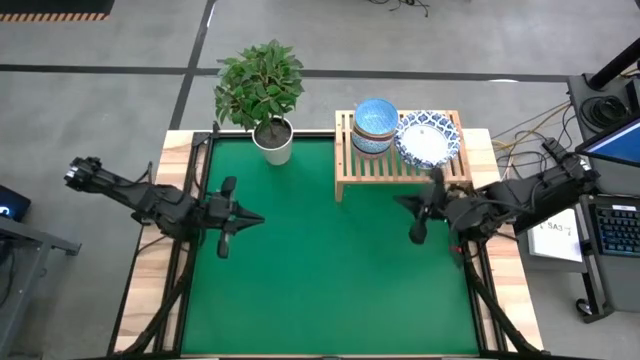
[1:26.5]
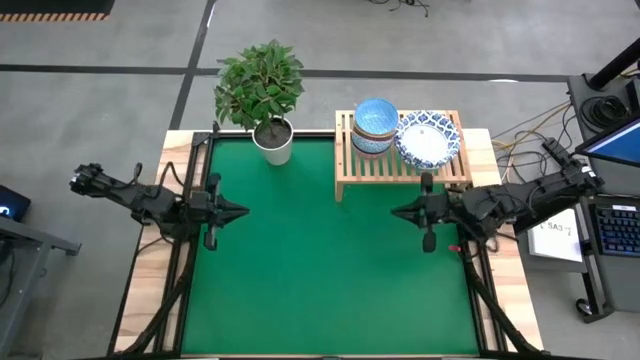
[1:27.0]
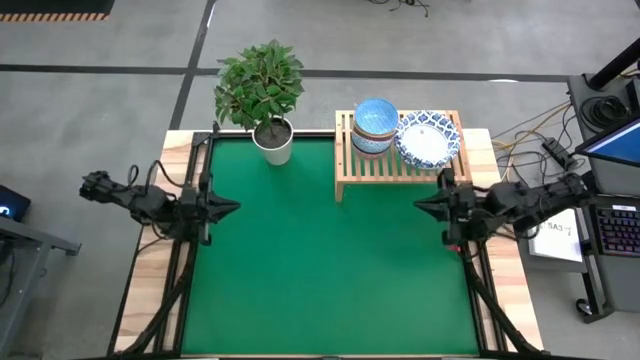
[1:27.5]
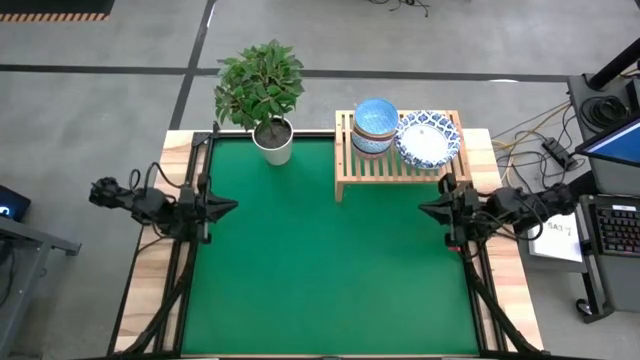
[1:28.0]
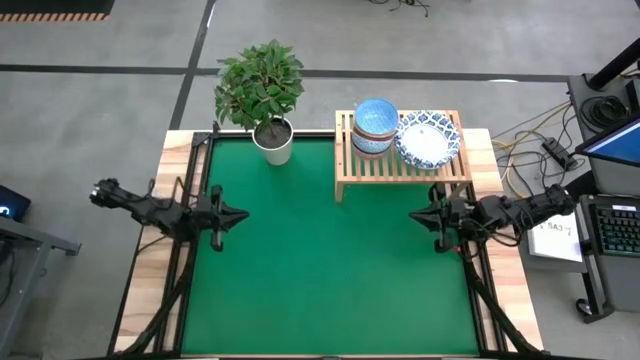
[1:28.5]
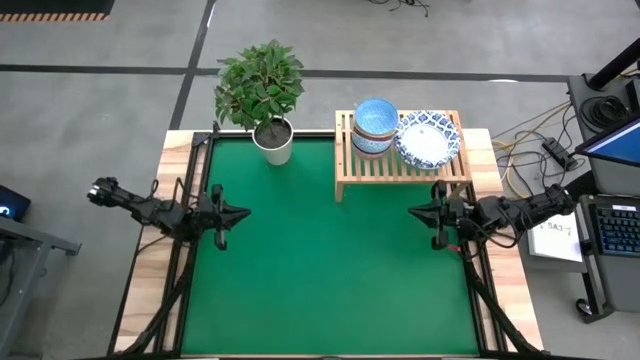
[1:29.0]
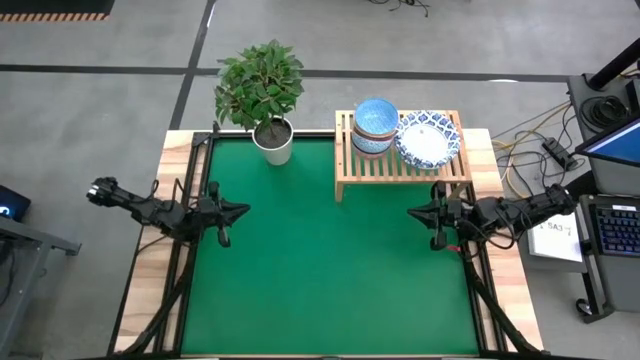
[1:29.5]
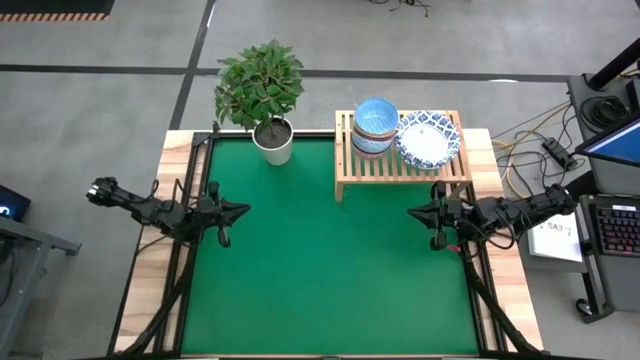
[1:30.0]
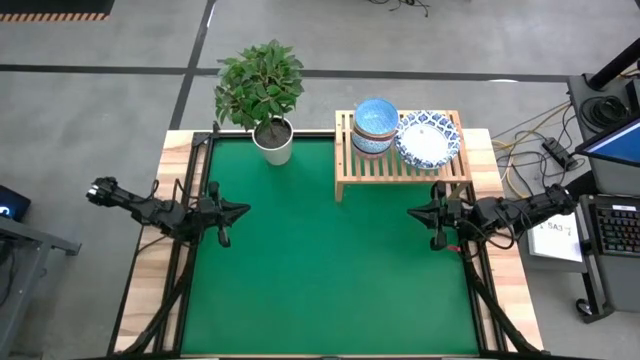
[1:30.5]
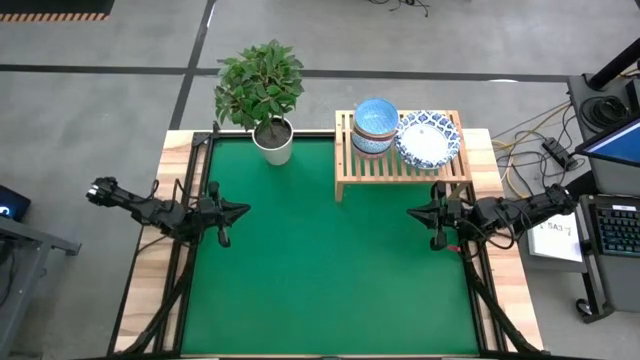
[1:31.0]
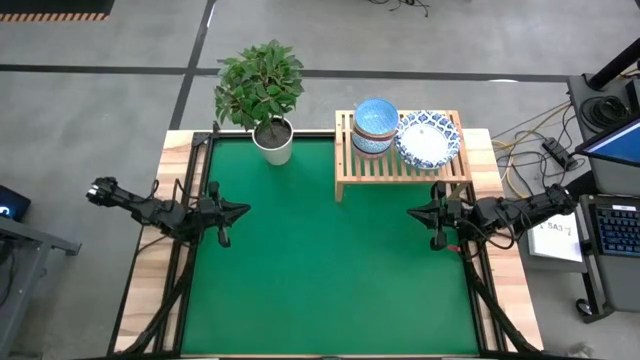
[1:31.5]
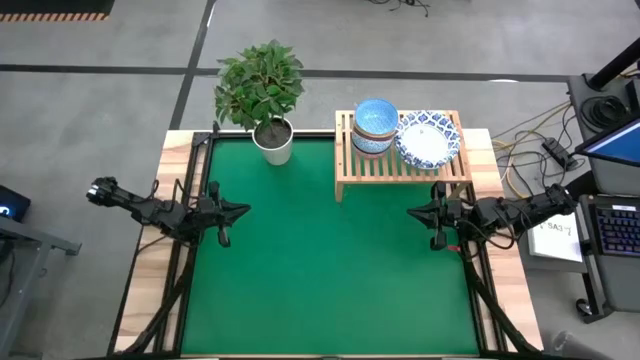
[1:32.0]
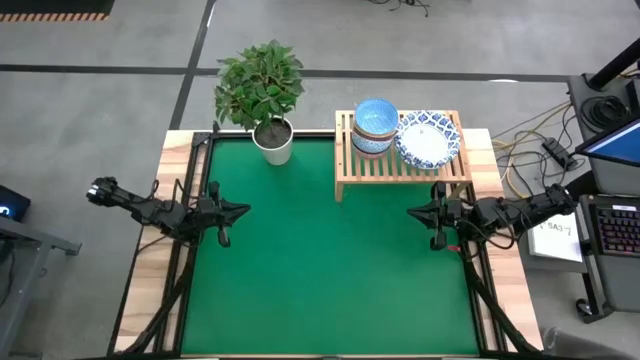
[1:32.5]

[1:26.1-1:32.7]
Task: Place and stack bowls onto a shelf
Return to Home Position

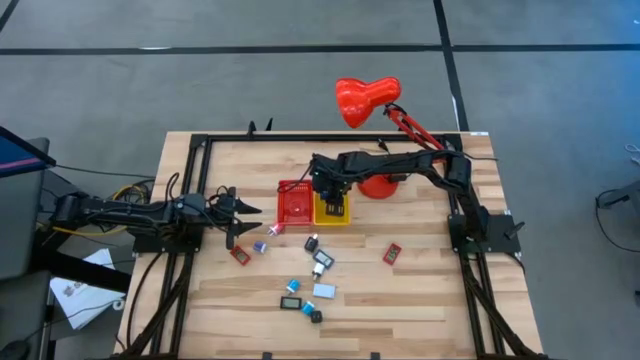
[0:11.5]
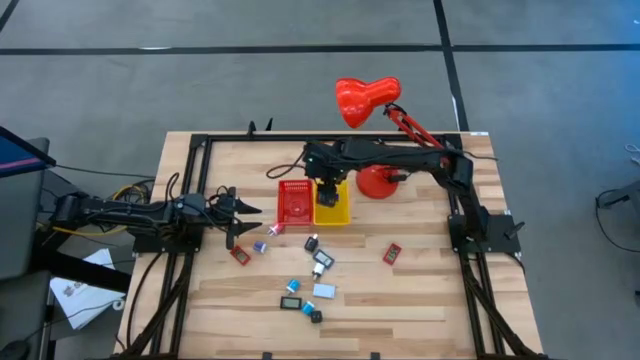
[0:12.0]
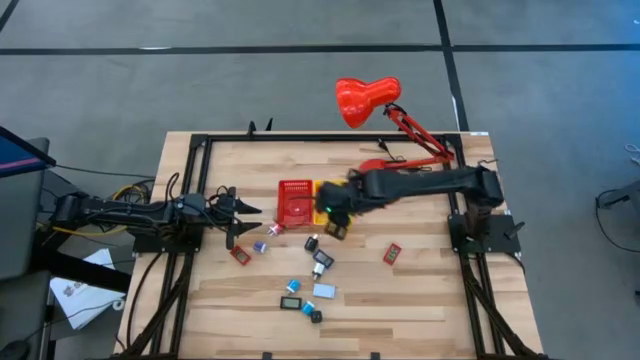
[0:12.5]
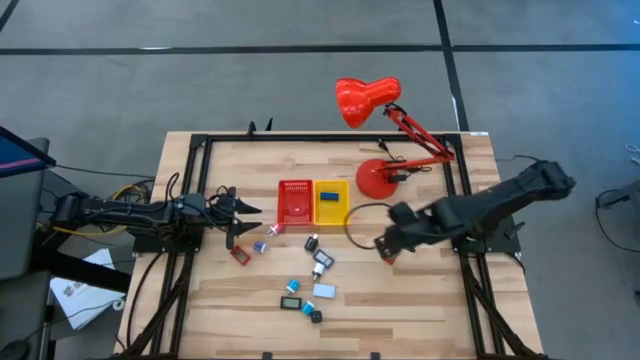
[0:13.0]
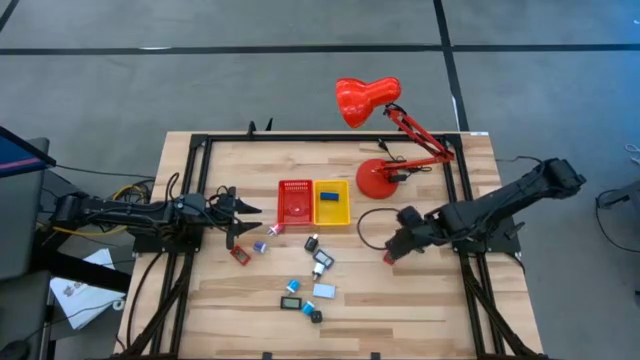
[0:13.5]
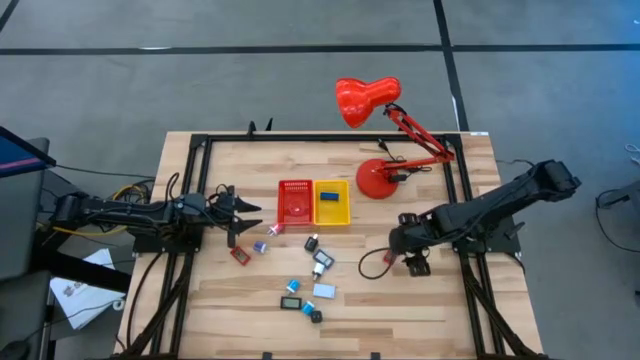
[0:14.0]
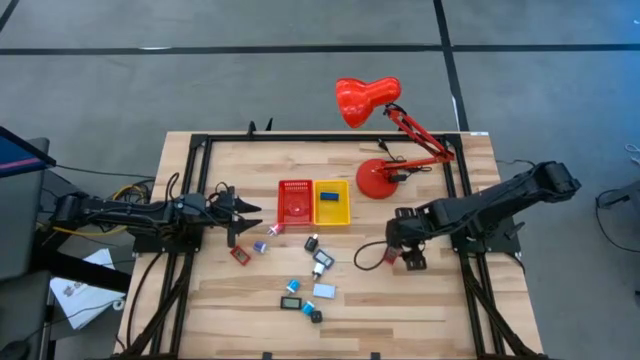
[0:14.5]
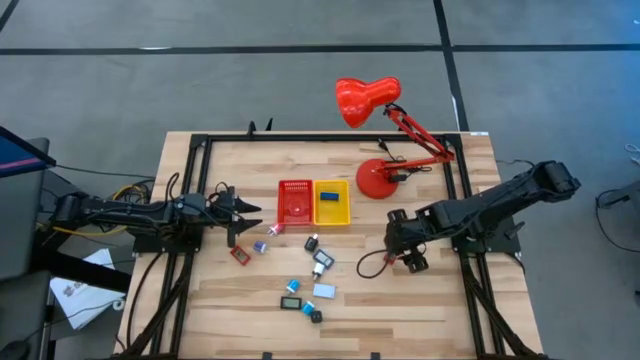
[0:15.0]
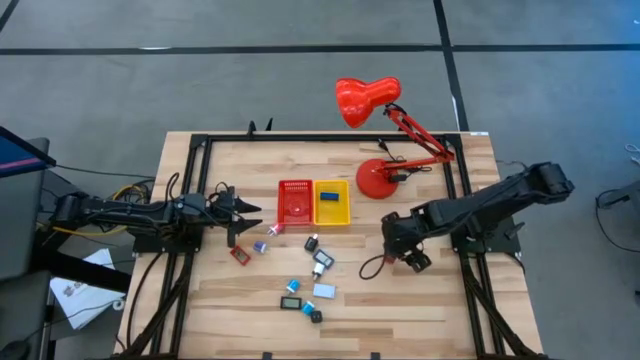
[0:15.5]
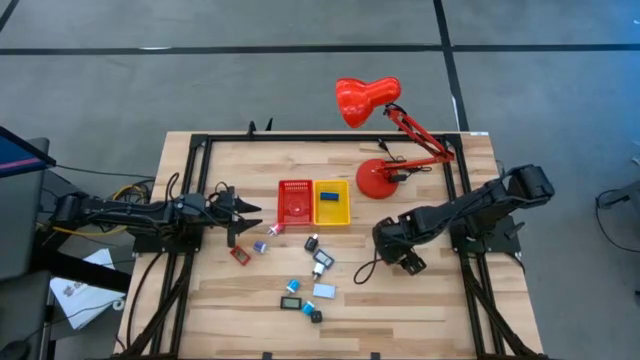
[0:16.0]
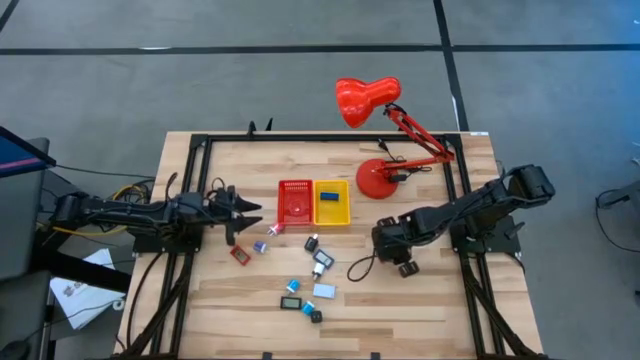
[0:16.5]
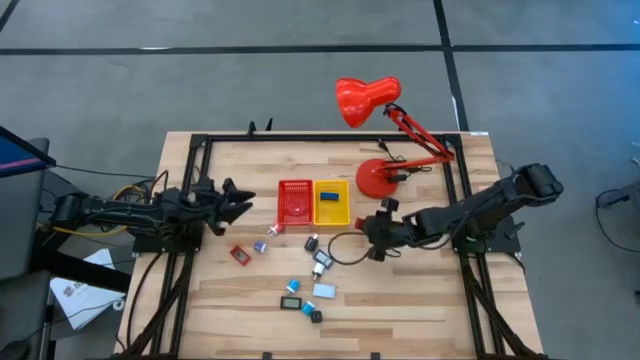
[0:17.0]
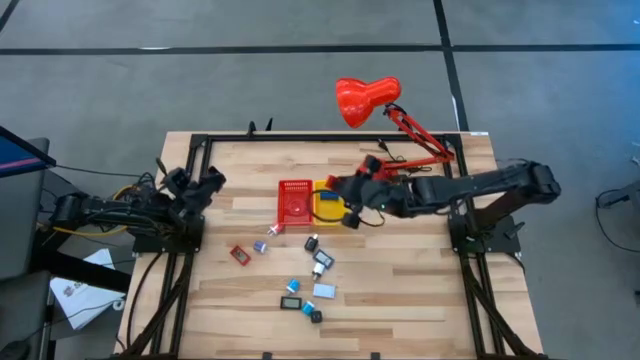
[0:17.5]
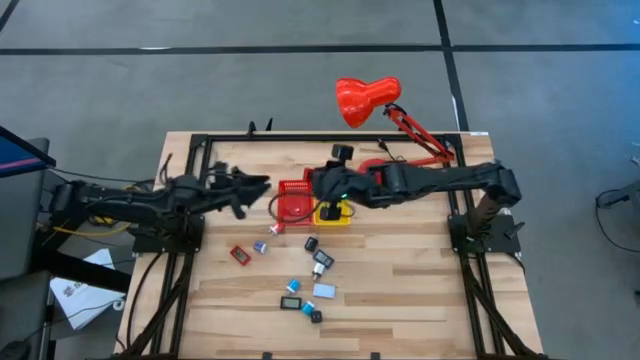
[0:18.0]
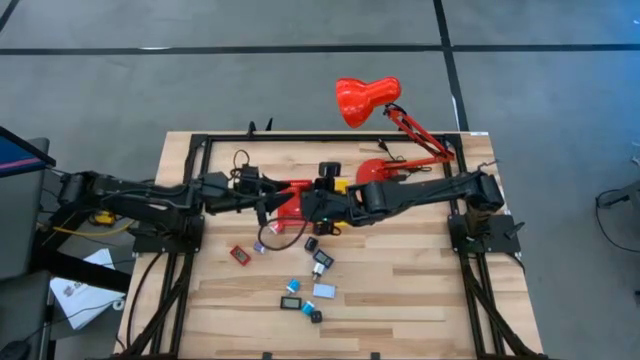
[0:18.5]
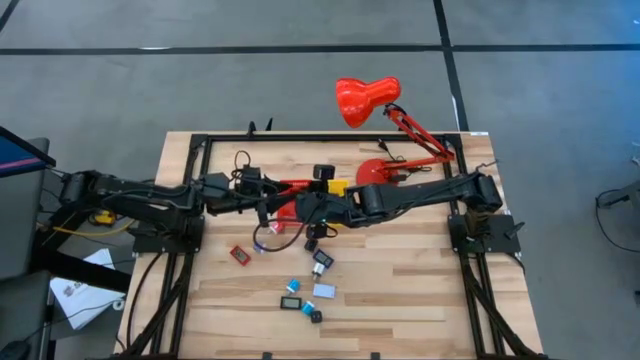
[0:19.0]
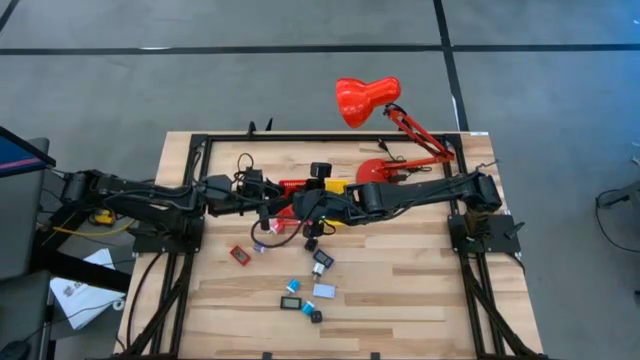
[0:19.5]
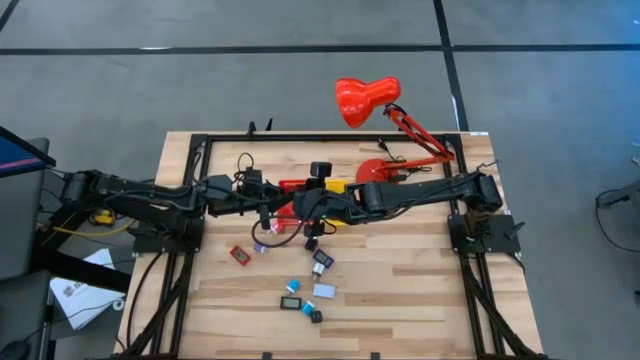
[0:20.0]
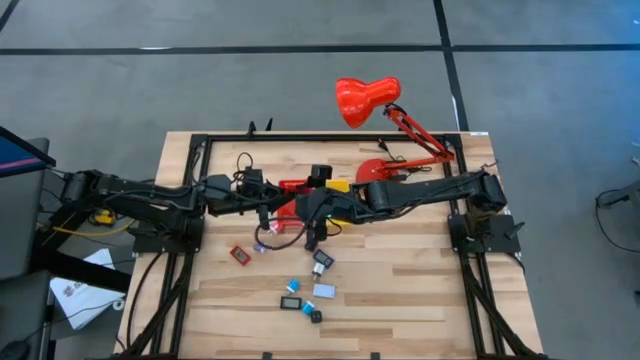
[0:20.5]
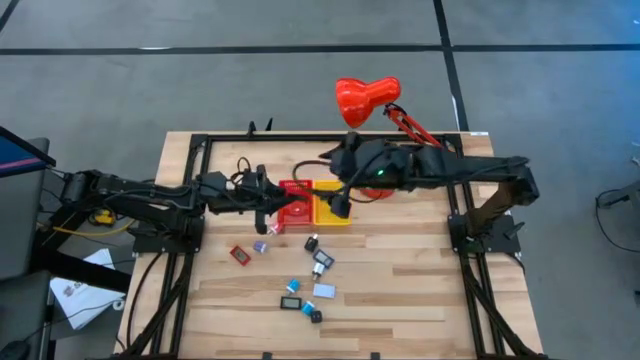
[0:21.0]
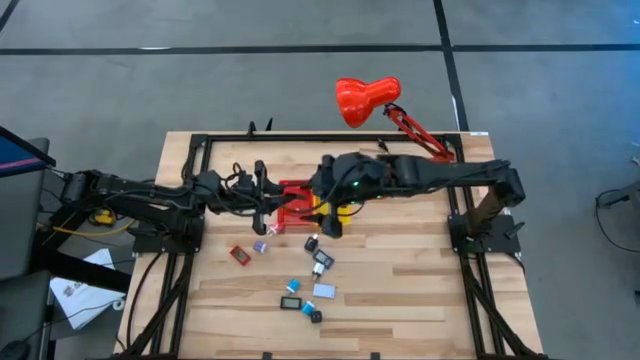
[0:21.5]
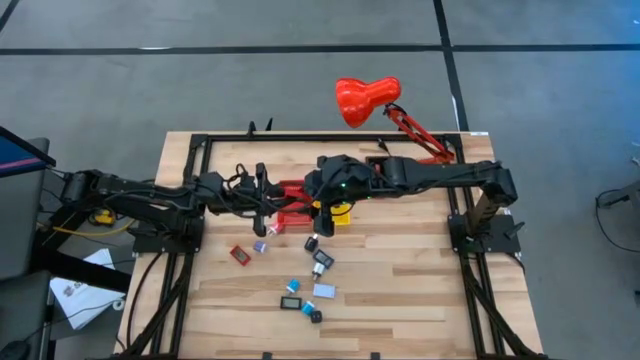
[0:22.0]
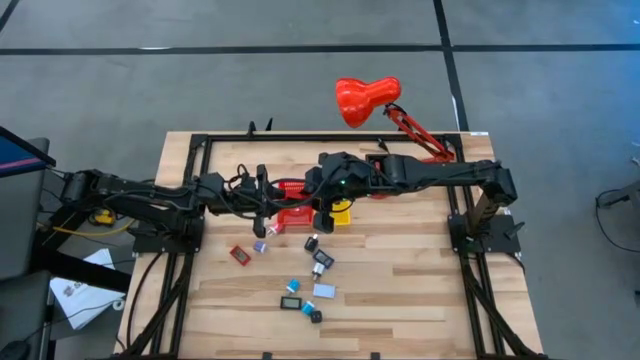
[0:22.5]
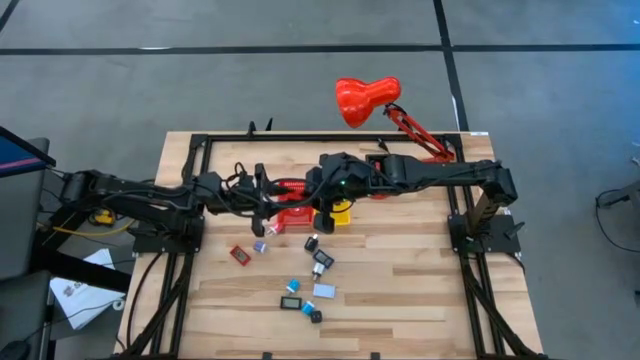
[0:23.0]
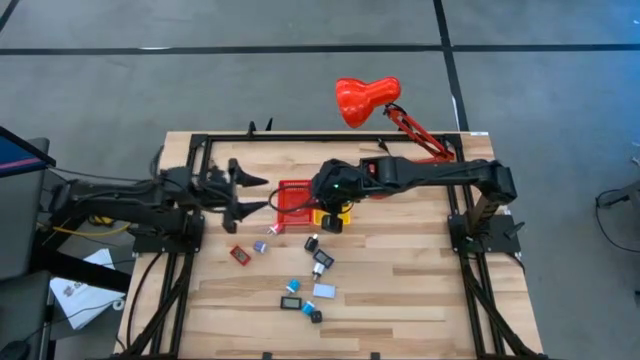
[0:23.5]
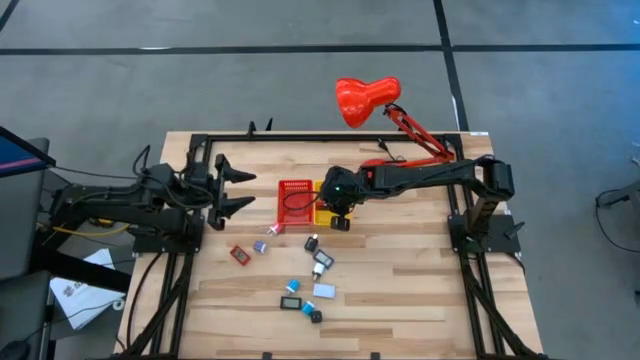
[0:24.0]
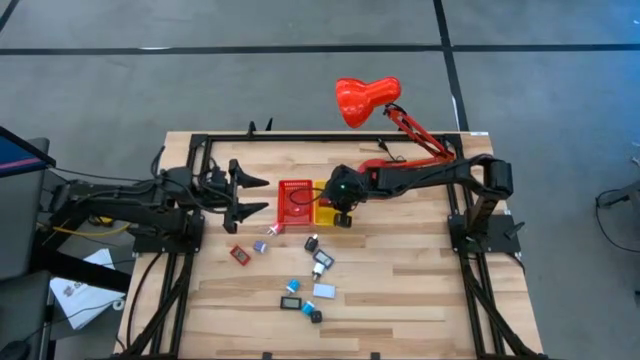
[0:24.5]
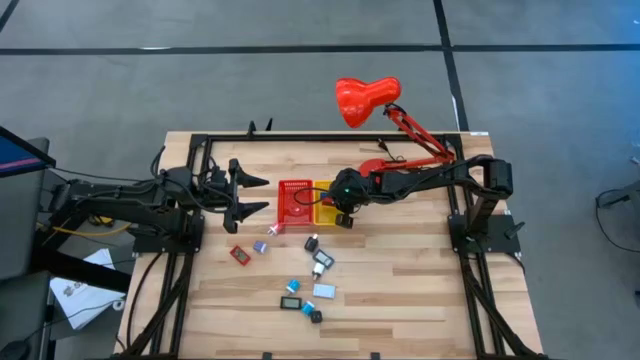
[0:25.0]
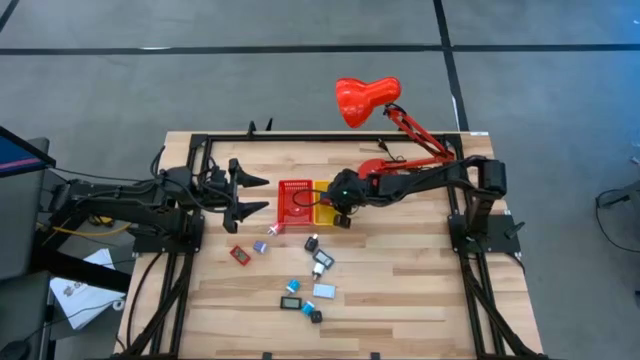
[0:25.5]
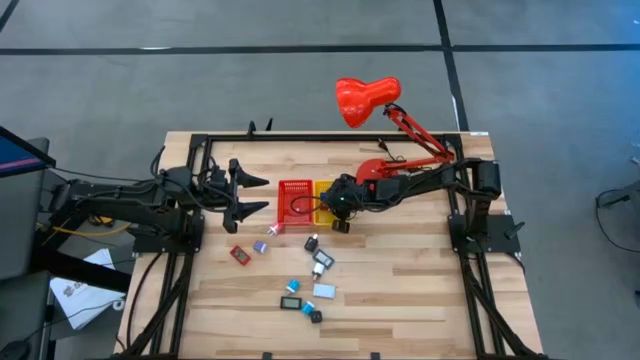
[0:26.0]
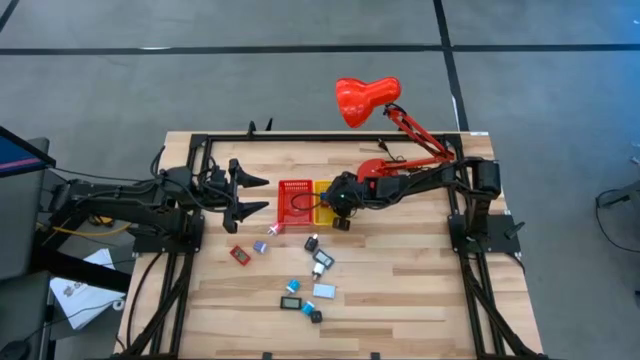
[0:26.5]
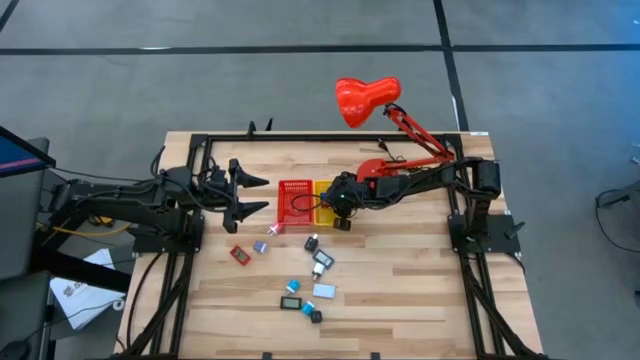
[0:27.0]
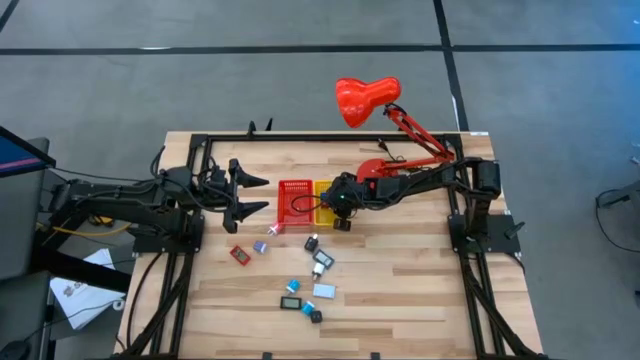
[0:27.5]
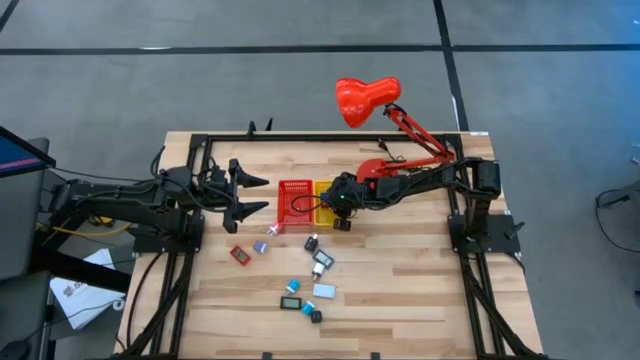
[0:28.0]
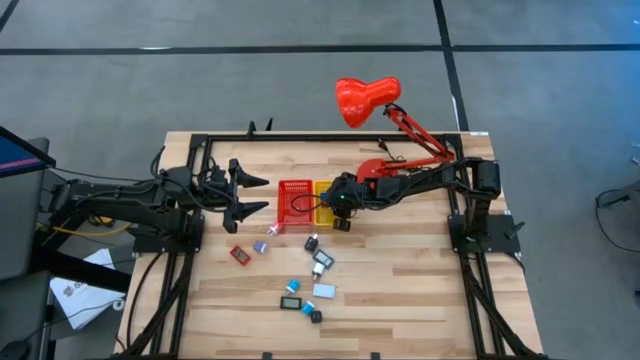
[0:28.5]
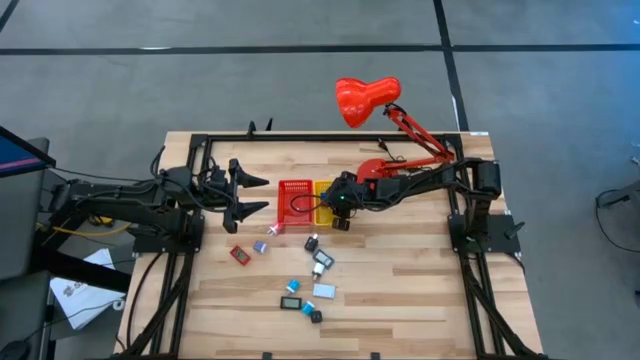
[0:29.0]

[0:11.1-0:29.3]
Task: Pick & Place Office items
Put the right red digital timer into the yellow basket
